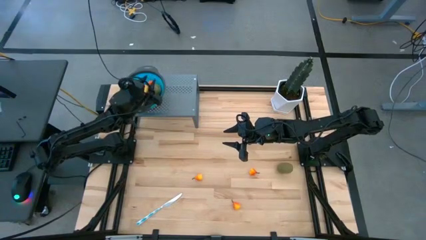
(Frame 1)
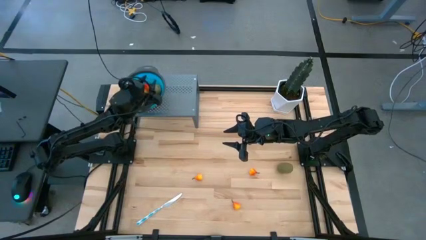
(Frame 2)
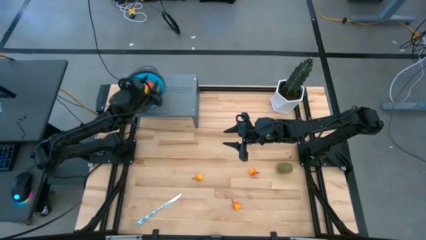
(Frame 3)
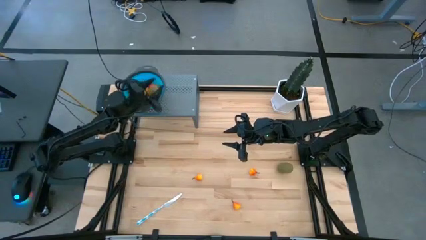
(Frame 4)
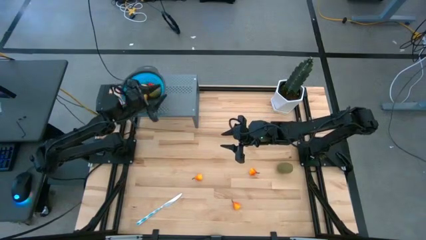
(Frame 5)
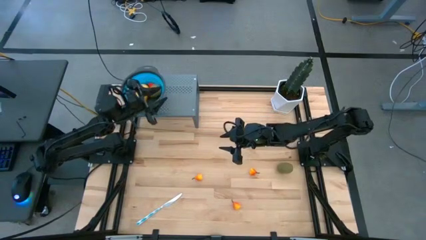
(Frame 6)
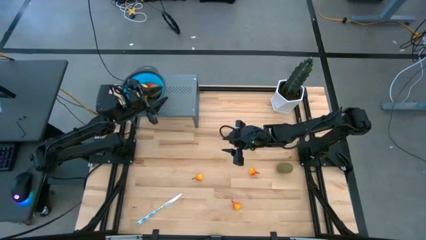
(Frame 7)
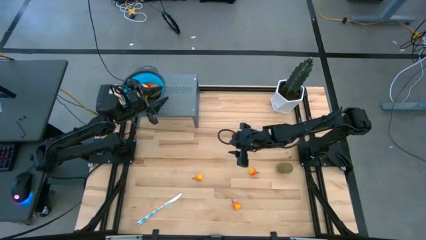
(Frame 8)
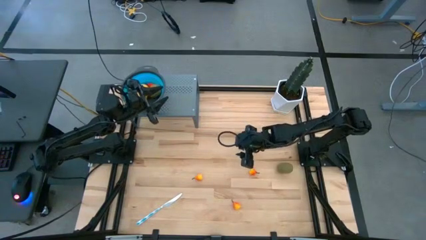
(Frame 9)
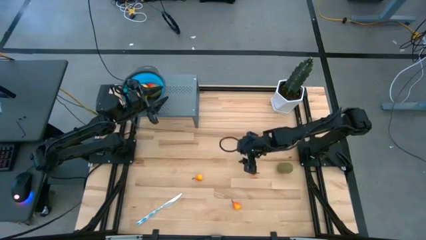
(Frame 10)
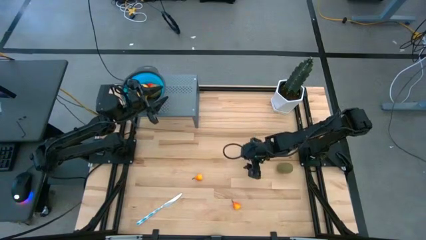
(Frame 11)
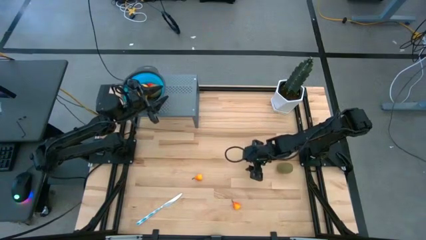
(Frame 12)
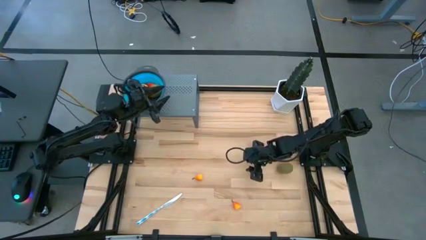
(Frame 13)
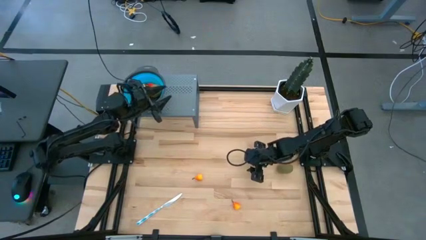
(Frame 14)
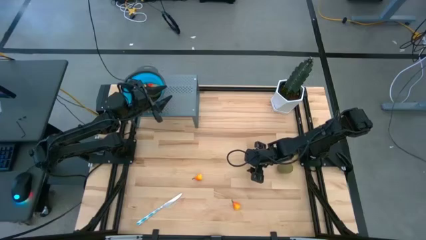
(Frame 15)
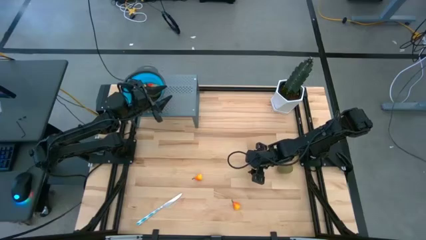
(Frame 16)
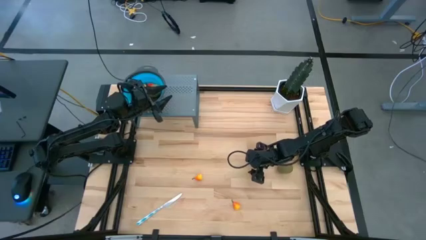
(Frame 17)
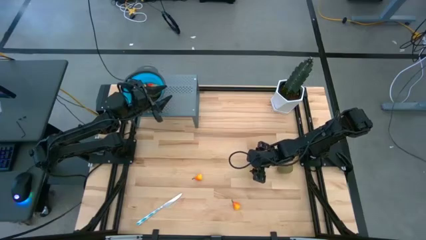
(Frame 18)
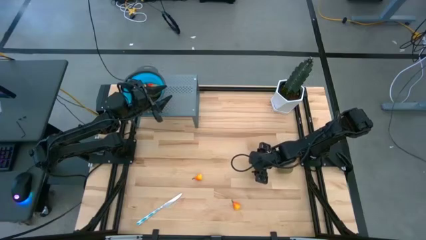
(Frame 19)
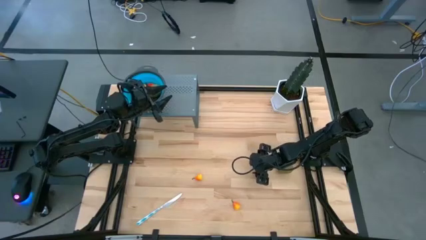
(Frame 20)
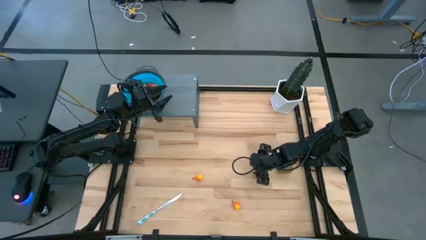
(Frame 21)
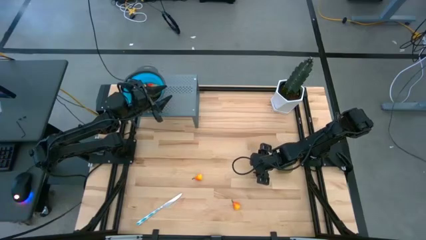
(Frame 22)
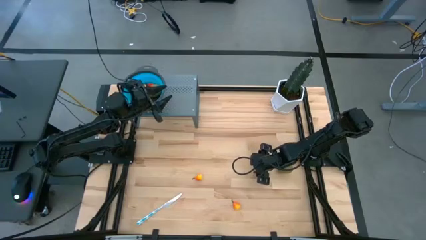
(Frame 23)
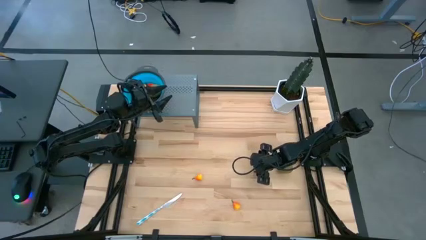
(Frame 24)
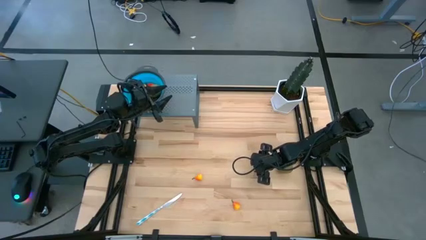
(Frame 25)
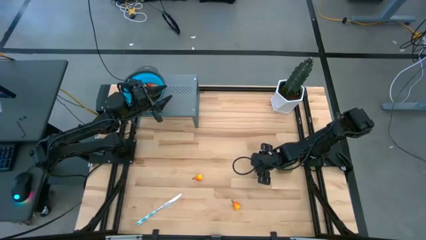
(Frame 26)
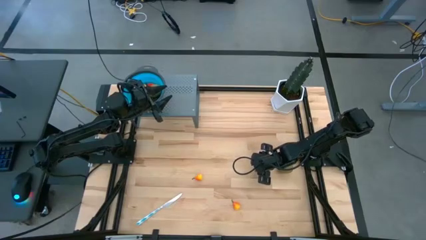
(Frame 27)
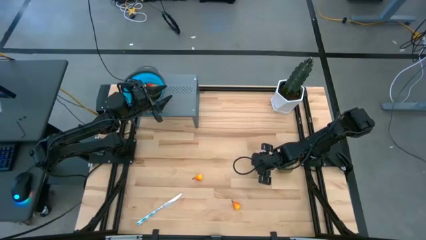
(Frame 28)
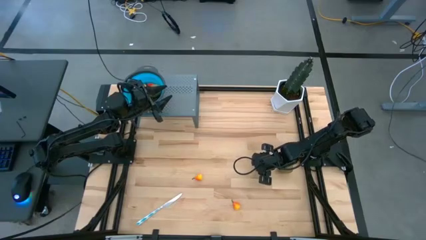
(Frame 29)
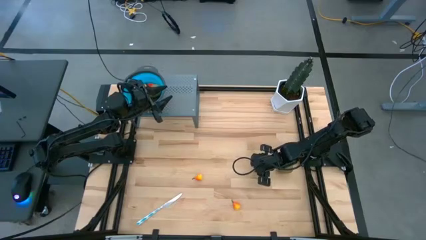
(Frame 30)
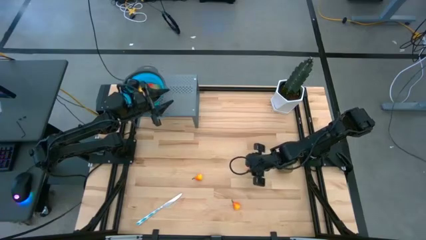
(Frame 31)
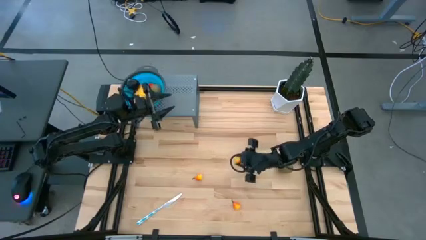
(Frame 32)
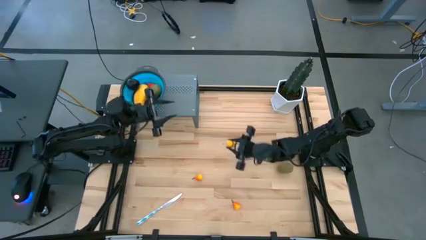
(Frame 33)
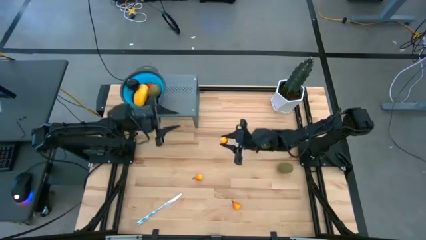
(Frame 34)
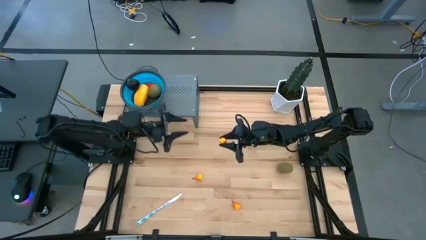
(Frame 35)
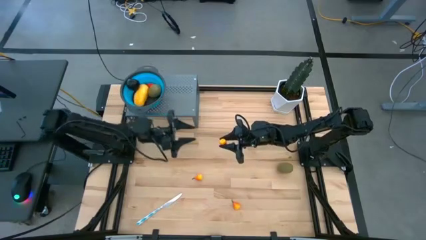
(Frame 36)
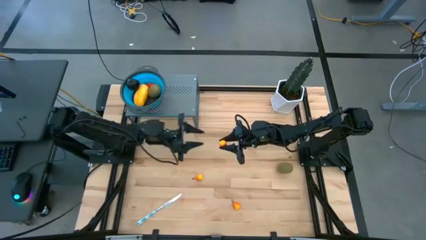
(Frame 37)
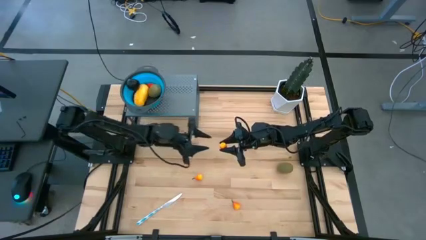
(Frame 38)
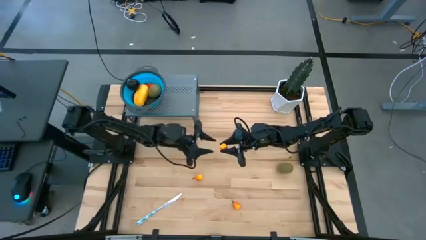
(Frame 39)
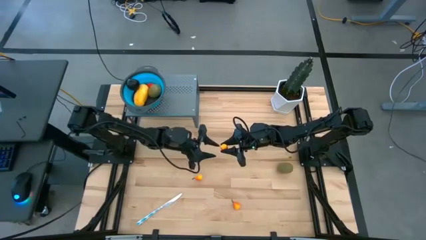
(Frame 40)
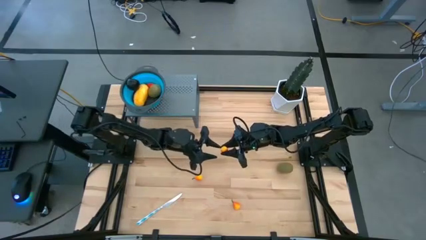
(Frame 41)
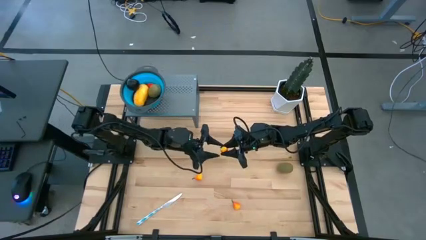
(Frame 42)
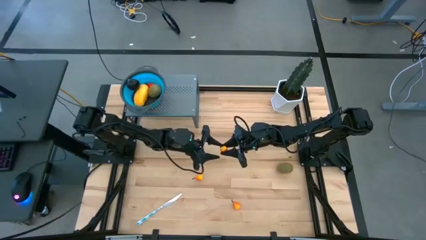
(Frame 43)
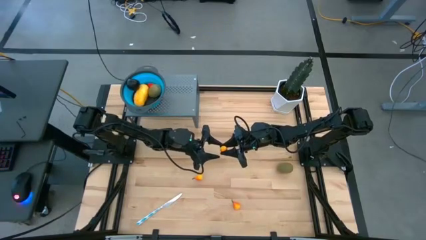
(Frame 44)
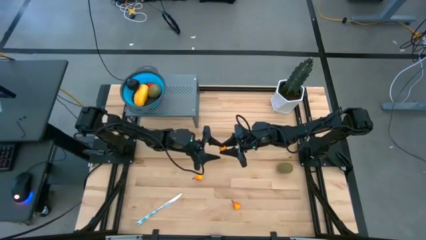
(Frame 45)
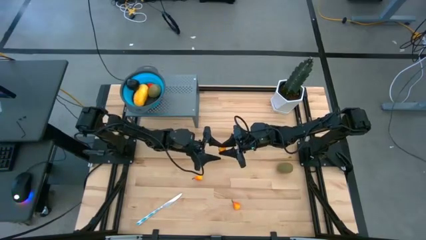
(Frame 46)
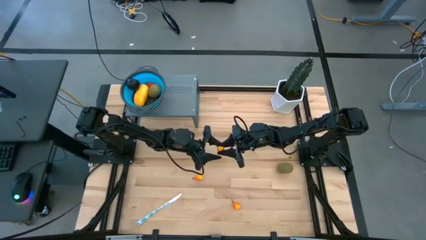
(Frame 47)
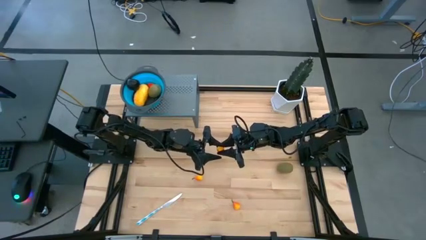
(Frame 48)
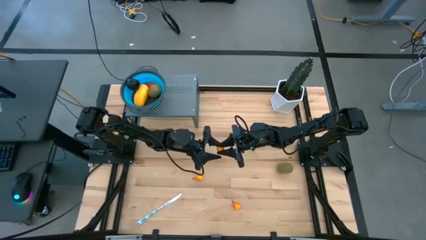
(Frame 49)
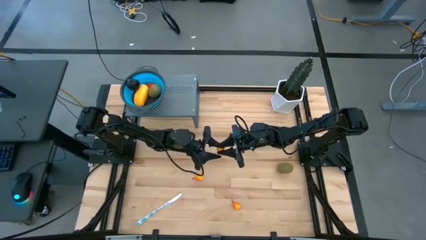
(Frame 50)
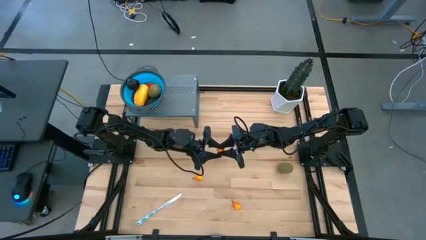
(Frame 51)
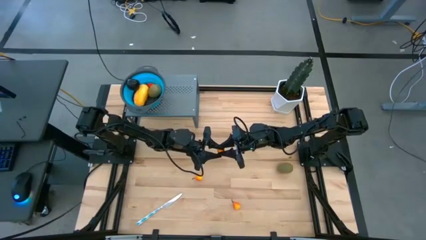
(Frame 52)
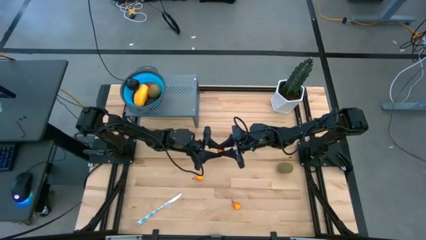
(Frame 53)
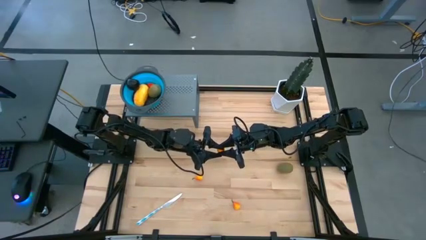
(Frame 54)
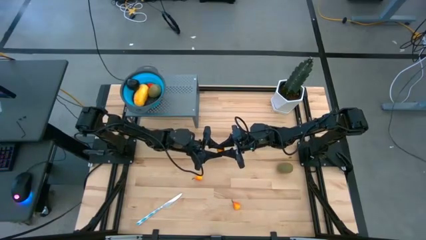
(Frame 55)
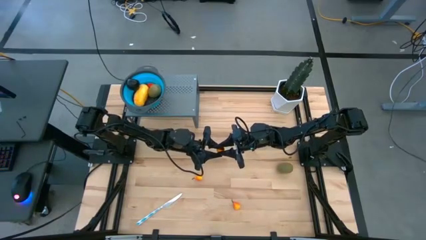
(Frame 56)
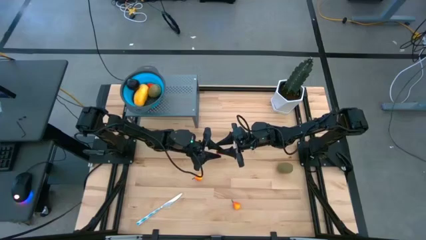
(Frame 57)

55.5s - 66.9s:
Task: Pick & Place Fruit
Put the orange pear into the blue strainer bowl on the shelf
